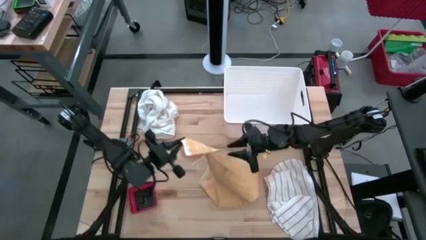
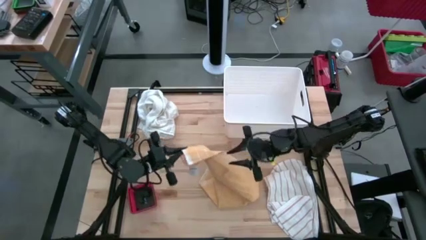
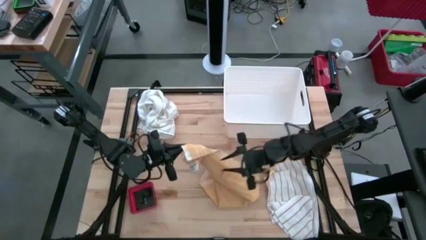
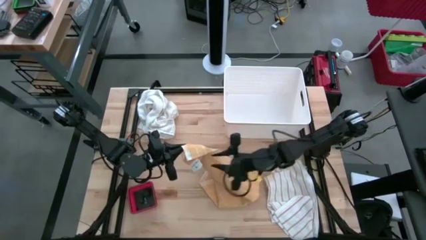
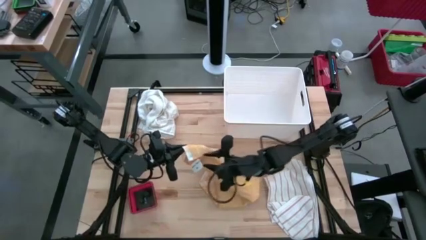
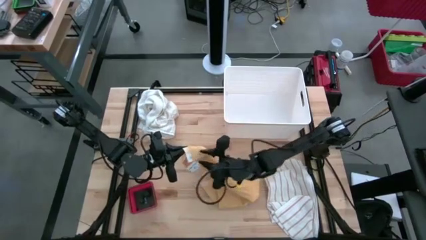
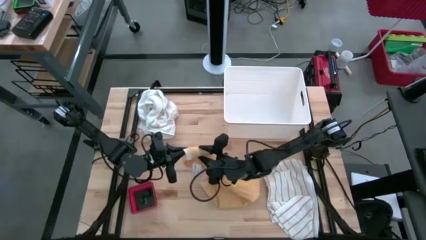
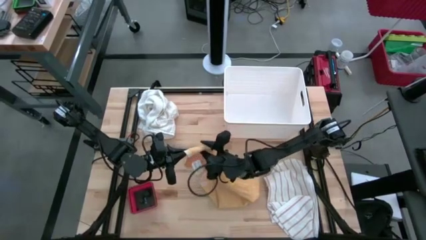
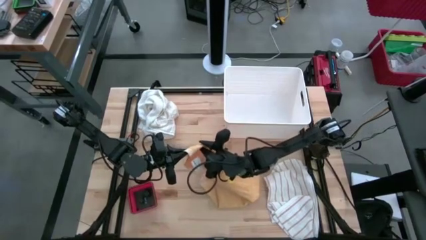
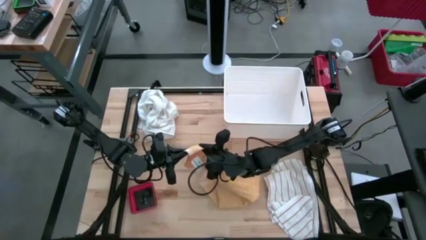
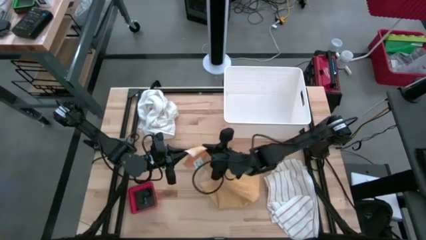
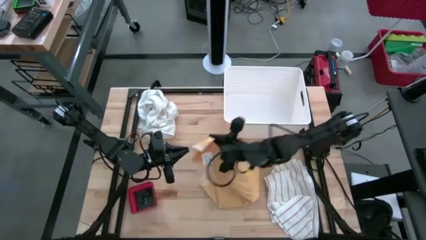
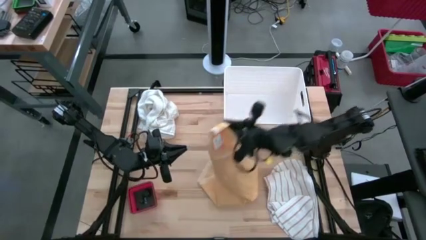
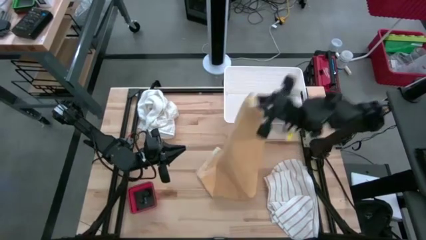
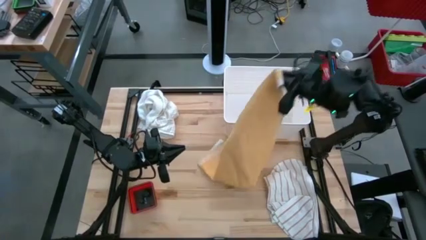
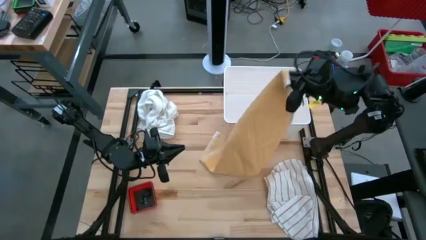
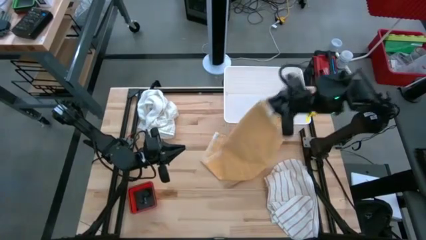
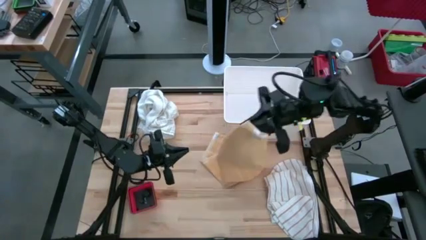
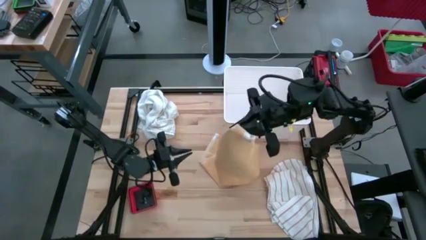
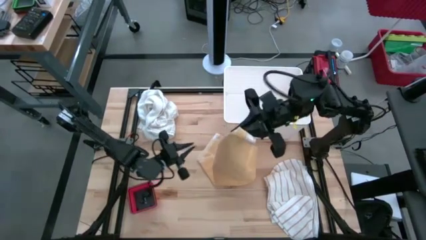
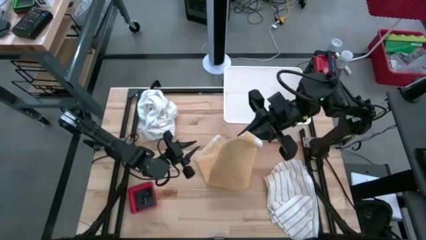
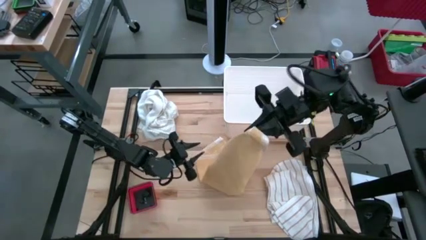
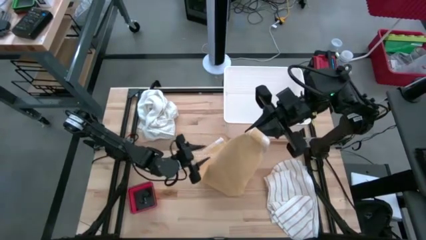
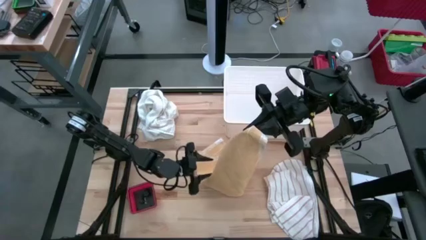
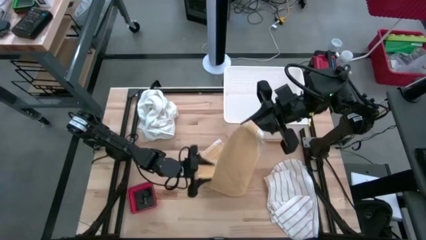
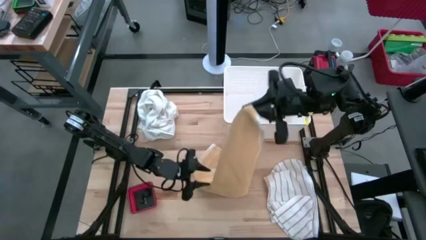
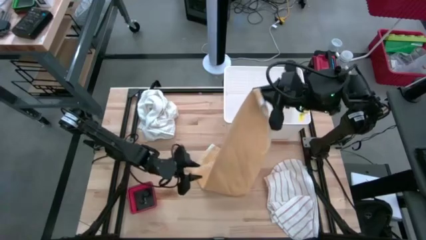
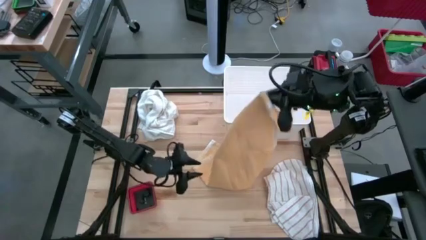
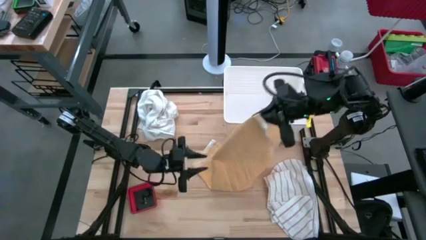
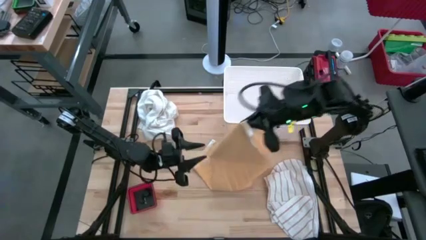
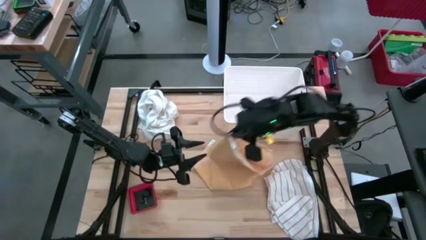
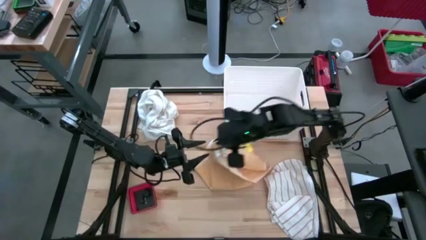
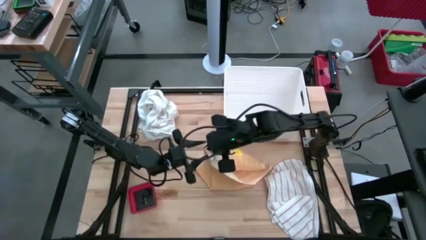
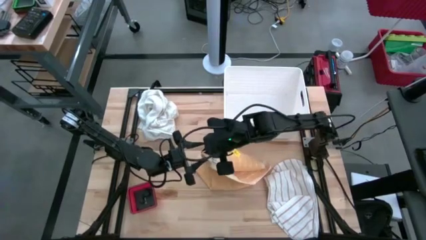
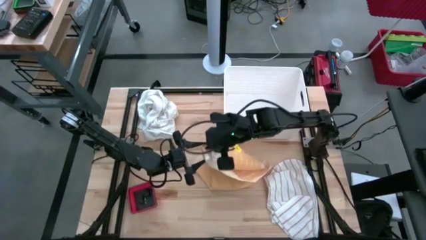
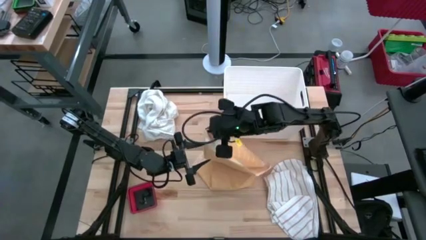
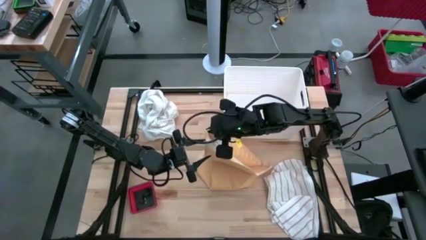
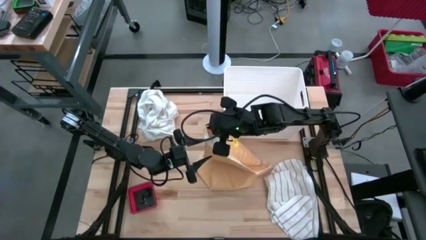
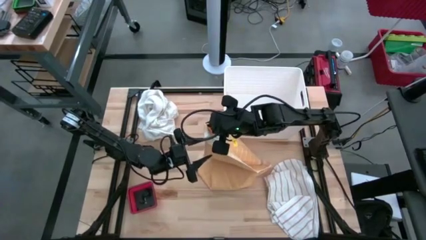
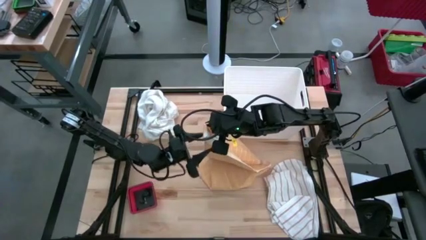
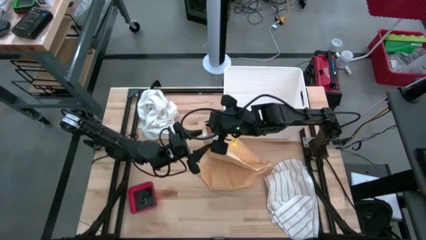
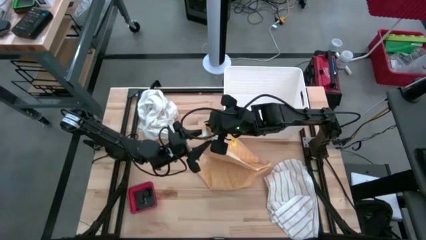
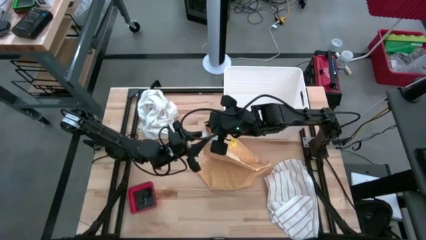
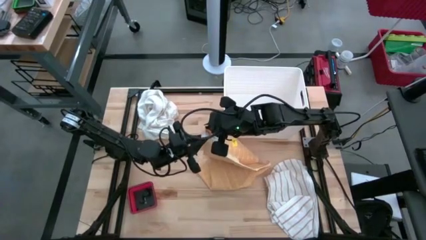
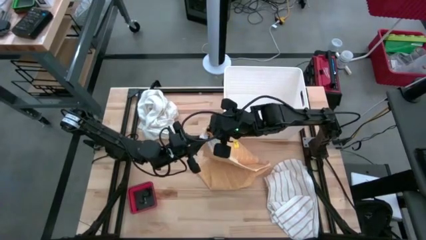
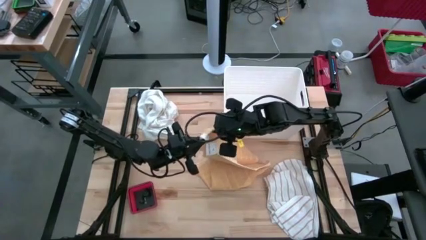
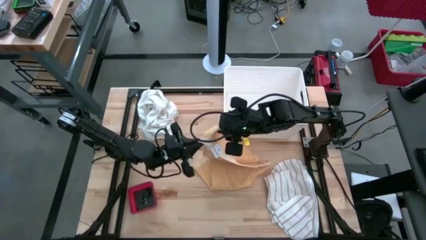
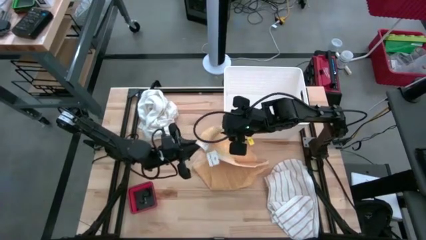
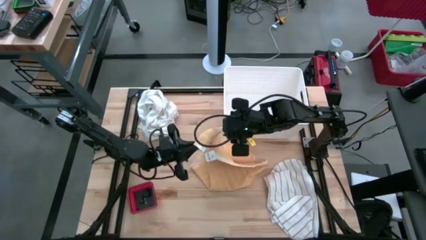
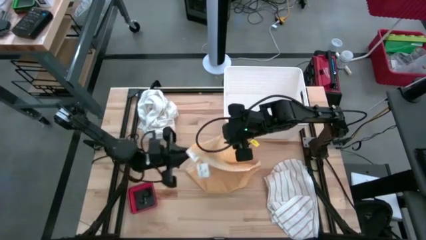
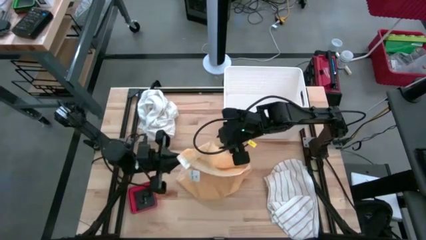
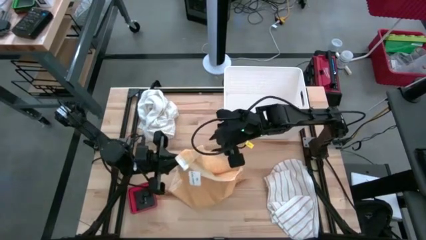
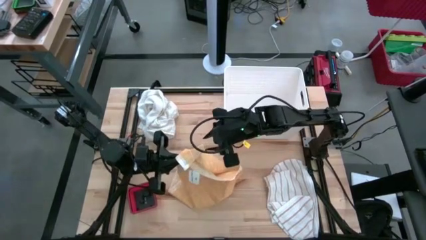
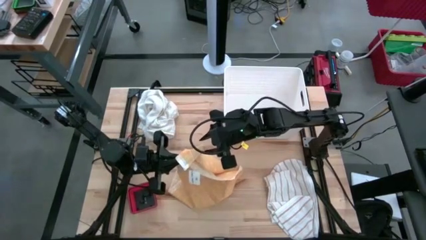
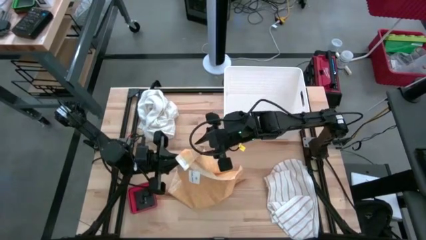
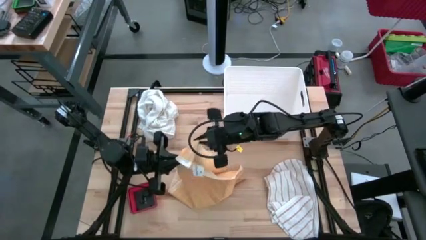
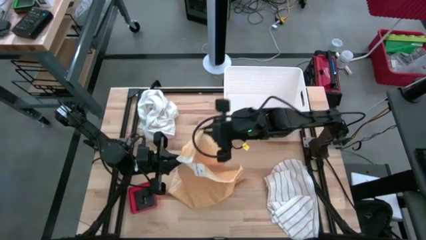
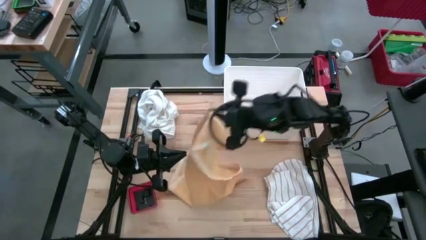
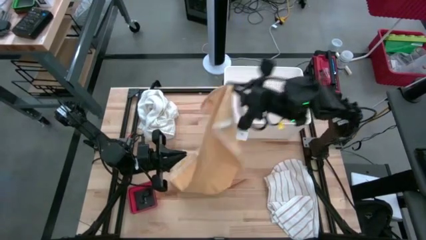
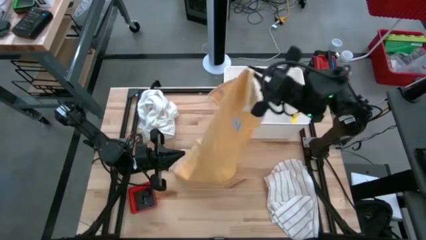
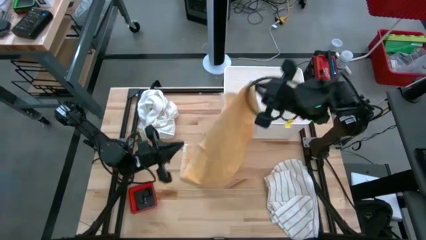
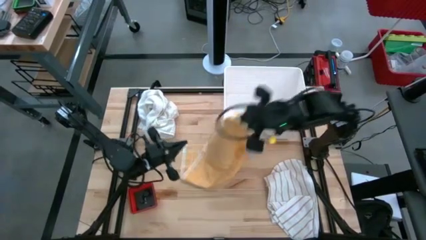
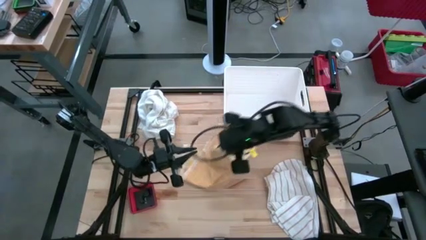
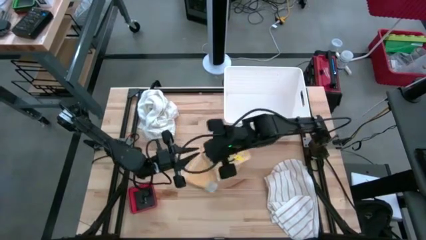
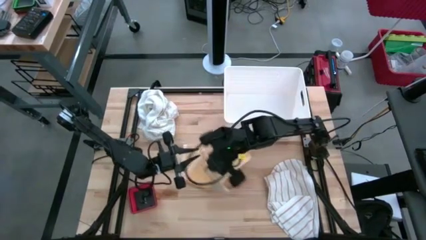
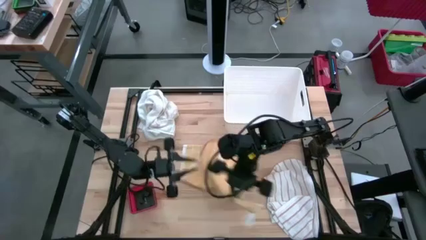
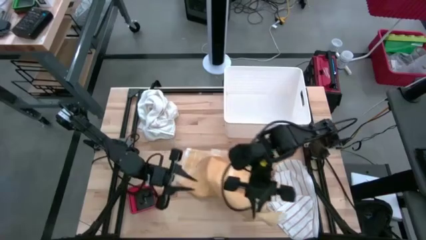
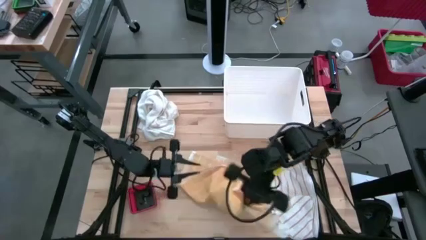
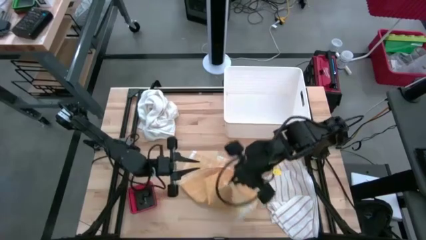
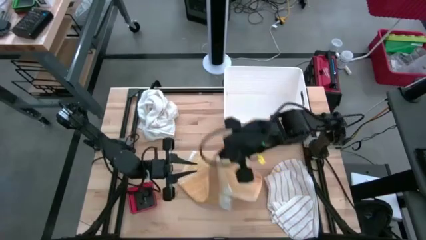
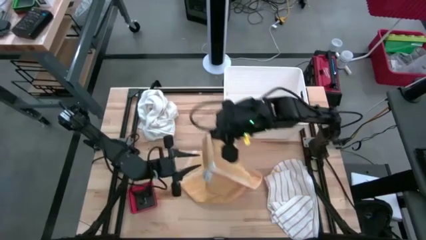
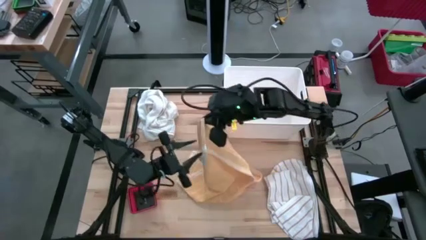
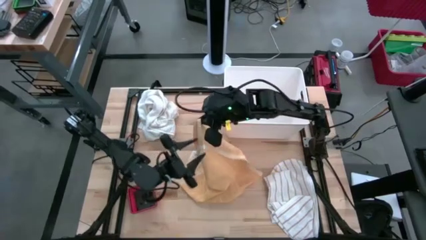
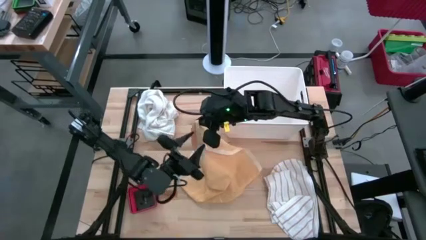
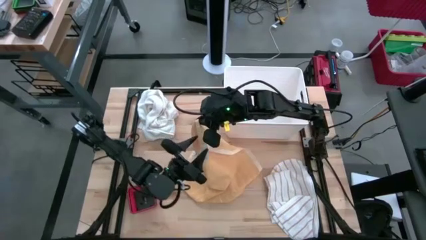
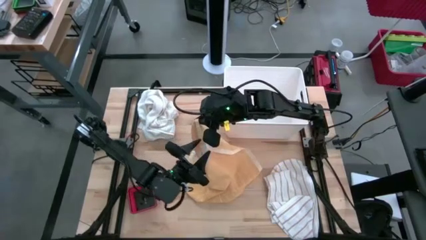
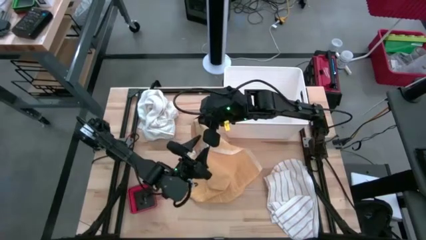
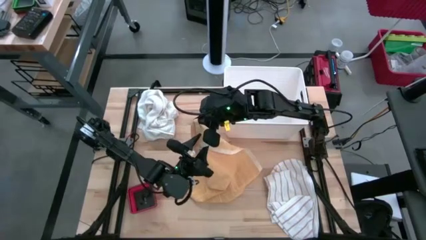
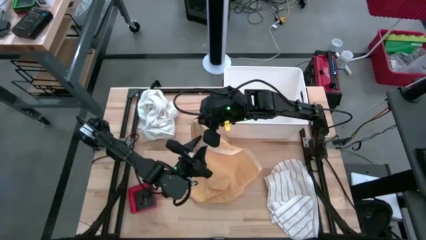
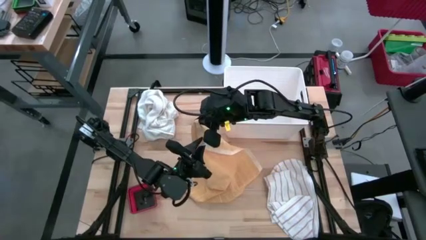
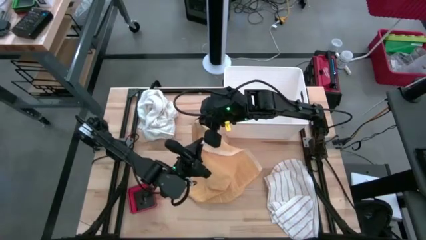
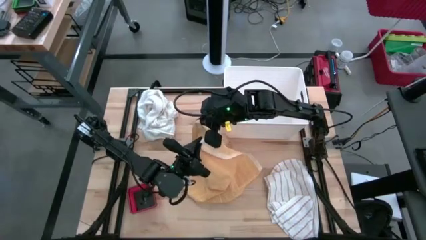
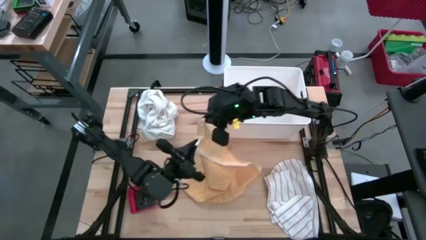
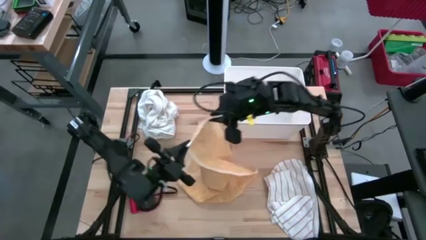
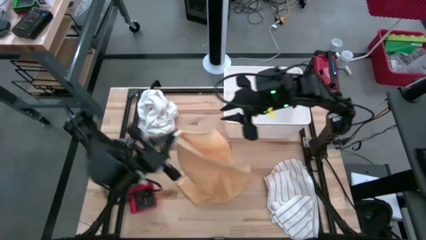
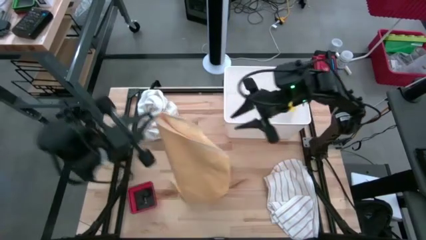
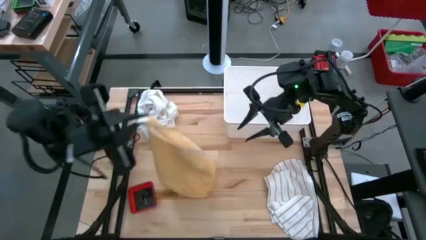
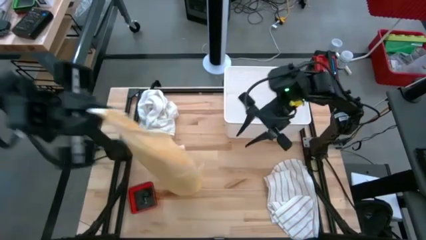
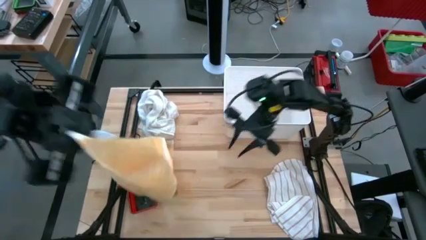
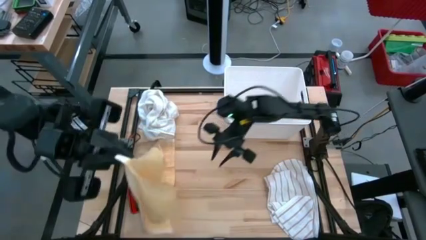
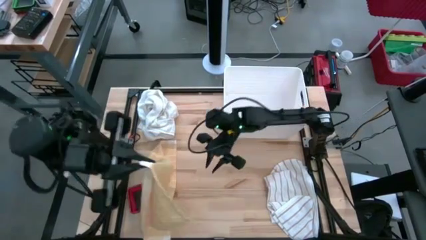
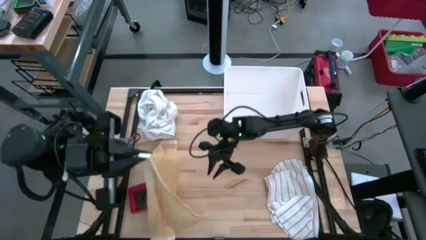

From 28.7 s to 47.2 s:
Task: Fold towel
Fold the yellow kitchen towel
